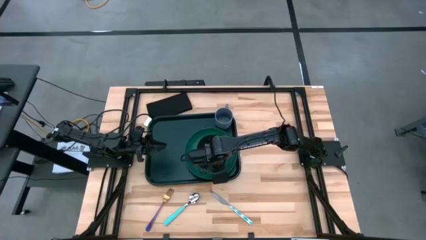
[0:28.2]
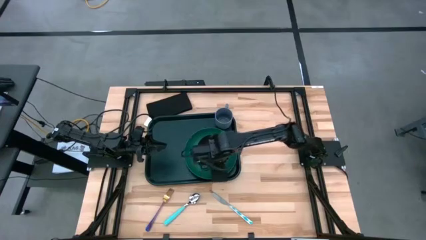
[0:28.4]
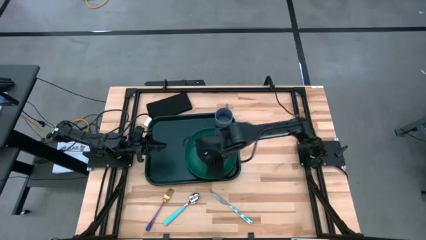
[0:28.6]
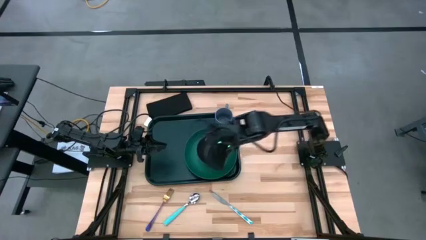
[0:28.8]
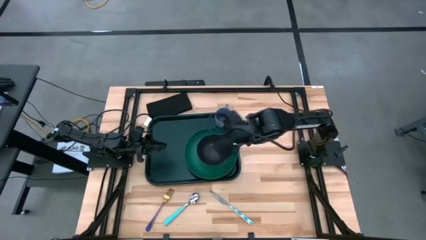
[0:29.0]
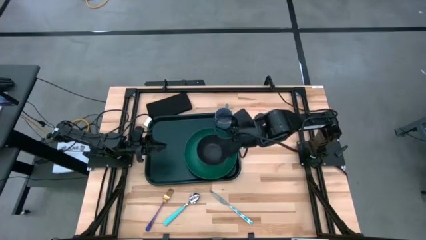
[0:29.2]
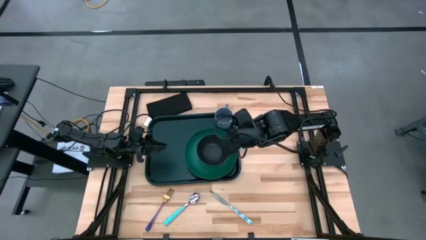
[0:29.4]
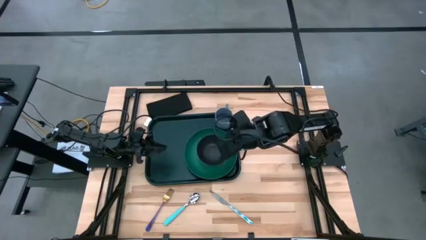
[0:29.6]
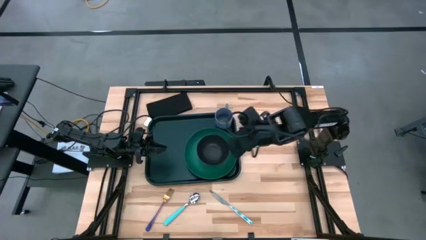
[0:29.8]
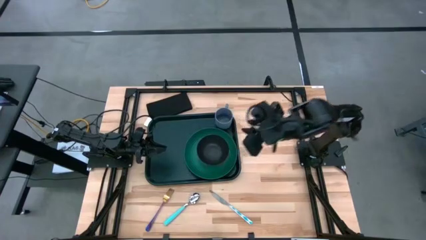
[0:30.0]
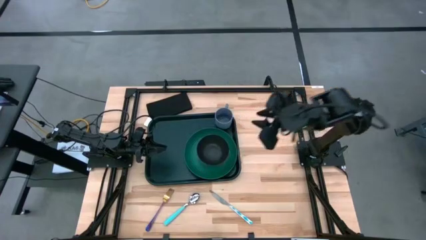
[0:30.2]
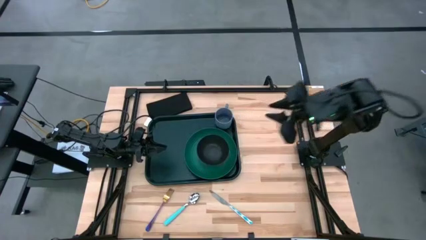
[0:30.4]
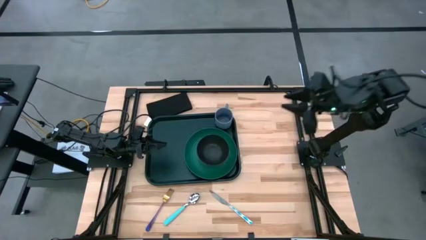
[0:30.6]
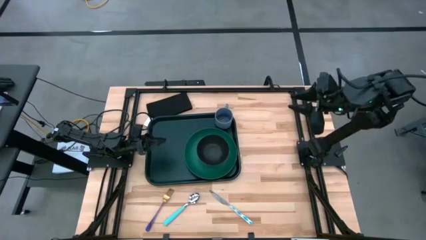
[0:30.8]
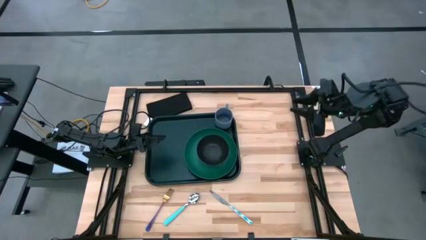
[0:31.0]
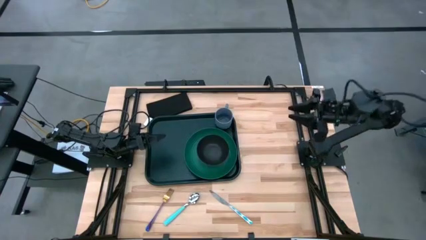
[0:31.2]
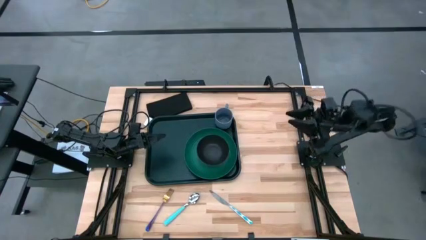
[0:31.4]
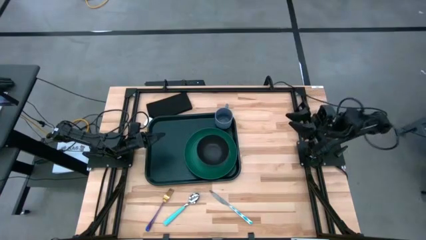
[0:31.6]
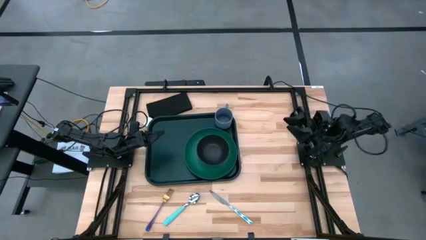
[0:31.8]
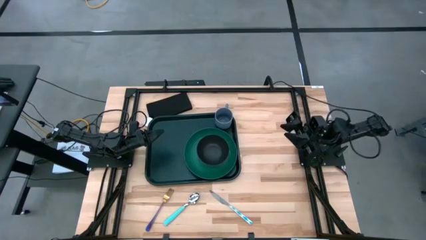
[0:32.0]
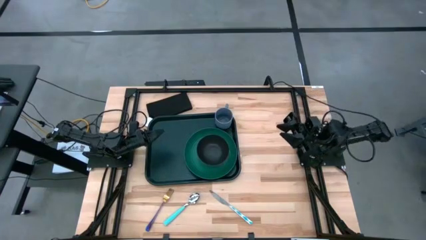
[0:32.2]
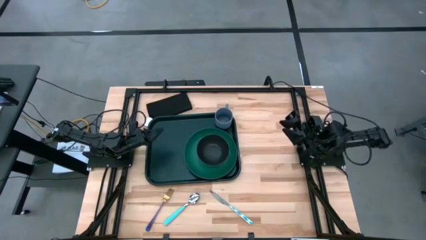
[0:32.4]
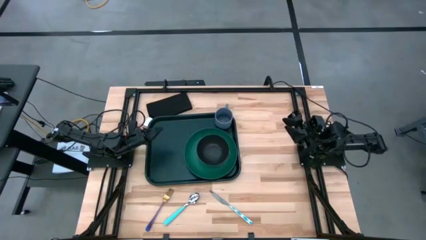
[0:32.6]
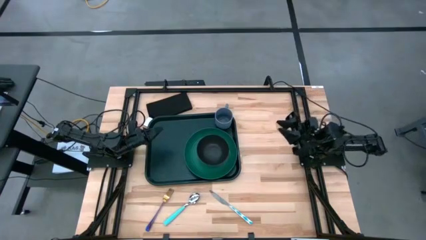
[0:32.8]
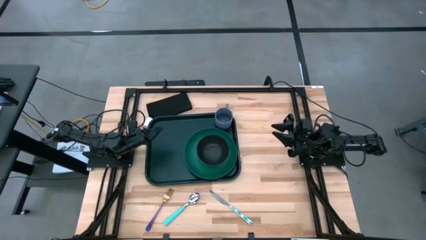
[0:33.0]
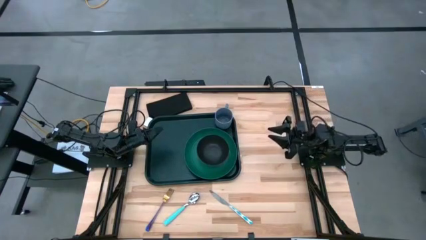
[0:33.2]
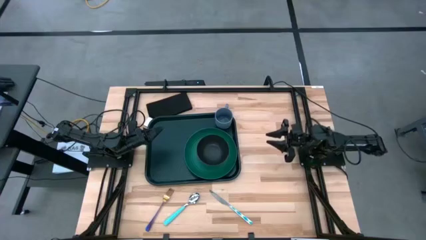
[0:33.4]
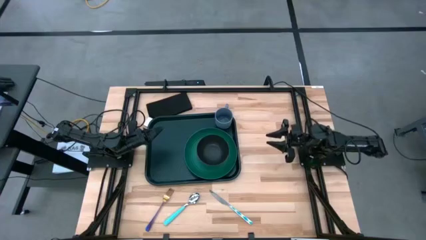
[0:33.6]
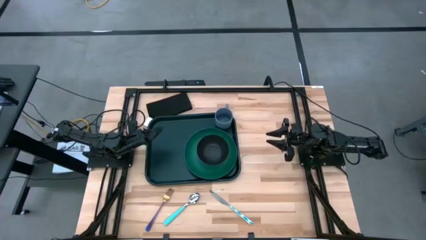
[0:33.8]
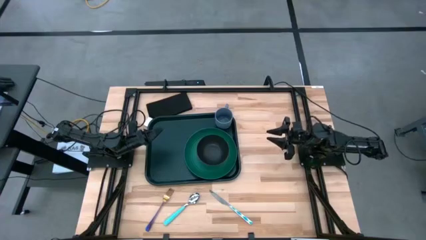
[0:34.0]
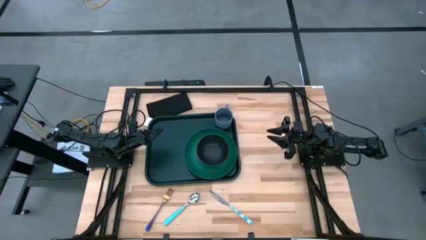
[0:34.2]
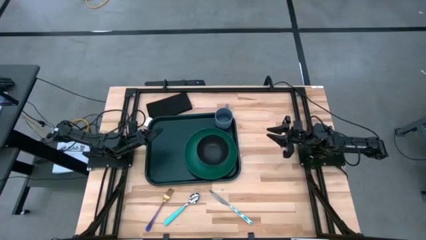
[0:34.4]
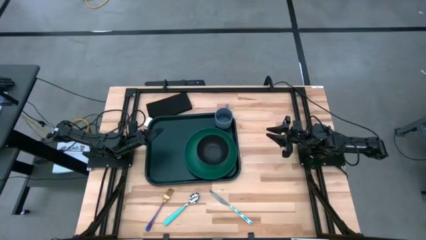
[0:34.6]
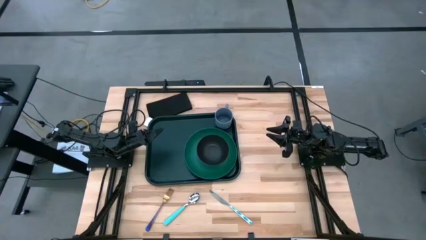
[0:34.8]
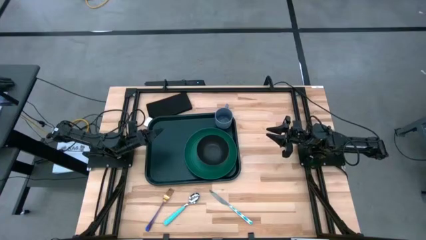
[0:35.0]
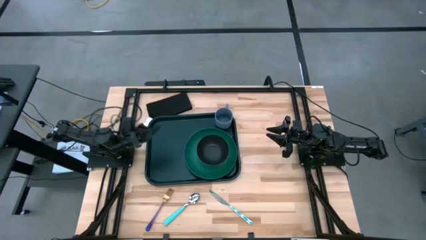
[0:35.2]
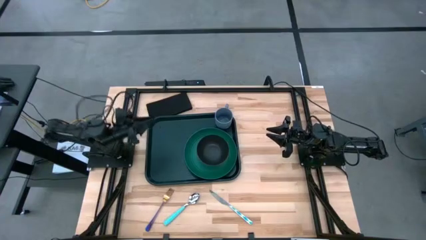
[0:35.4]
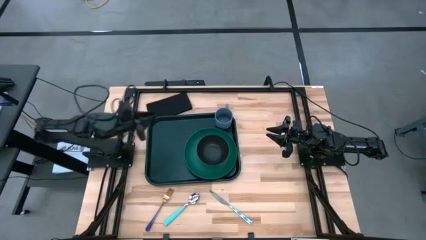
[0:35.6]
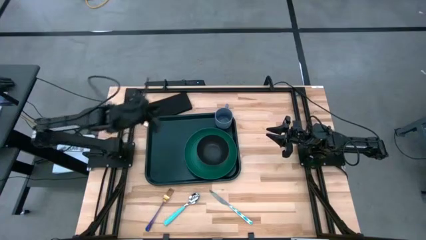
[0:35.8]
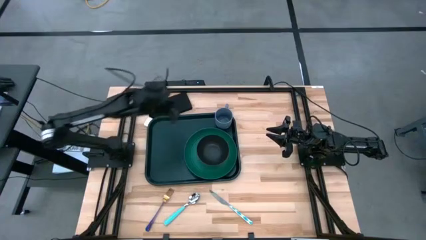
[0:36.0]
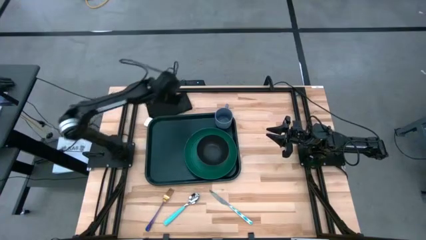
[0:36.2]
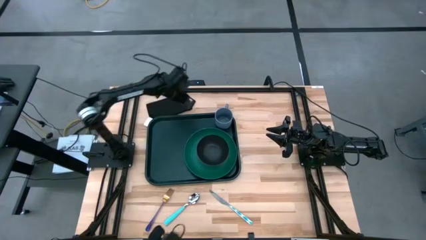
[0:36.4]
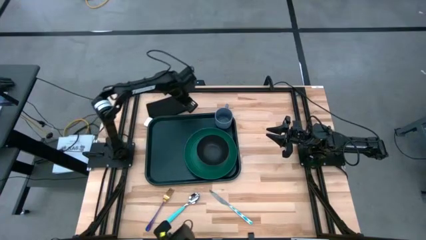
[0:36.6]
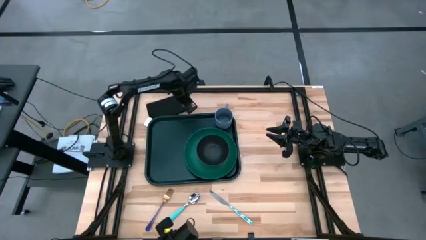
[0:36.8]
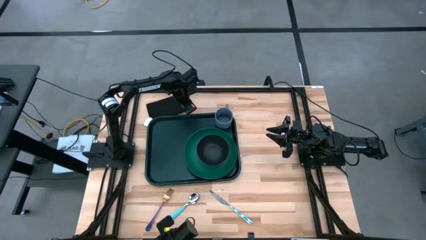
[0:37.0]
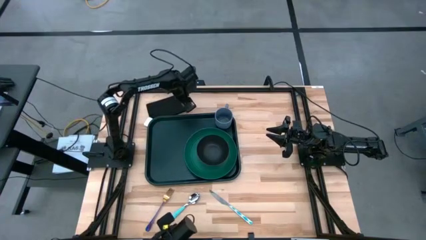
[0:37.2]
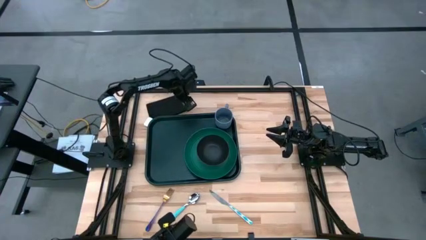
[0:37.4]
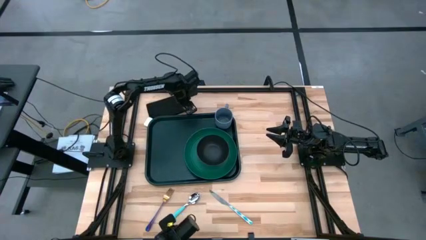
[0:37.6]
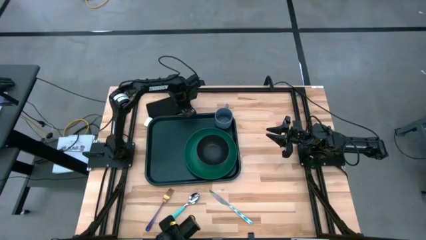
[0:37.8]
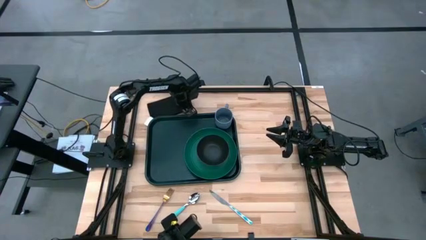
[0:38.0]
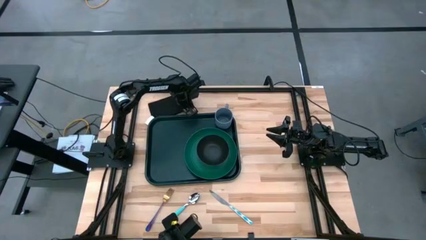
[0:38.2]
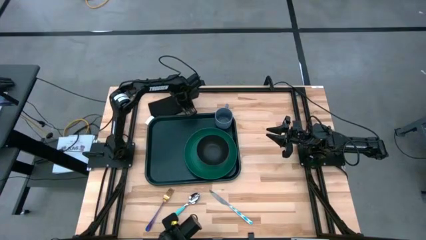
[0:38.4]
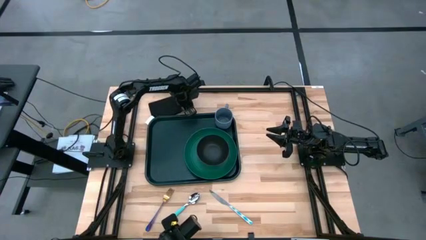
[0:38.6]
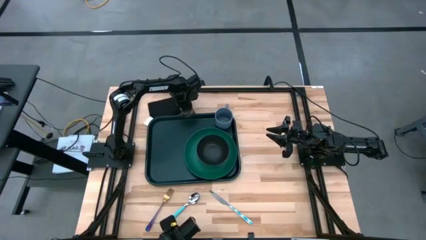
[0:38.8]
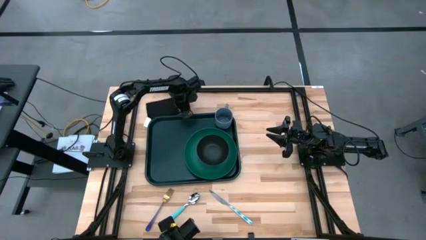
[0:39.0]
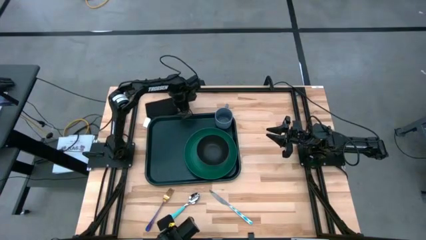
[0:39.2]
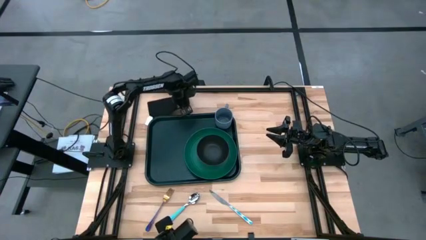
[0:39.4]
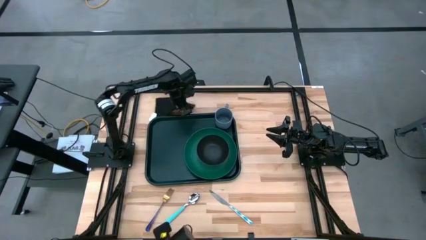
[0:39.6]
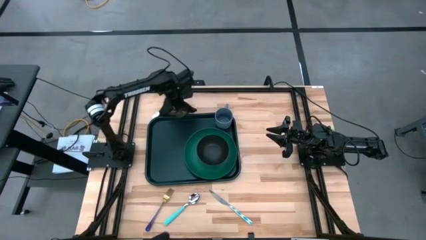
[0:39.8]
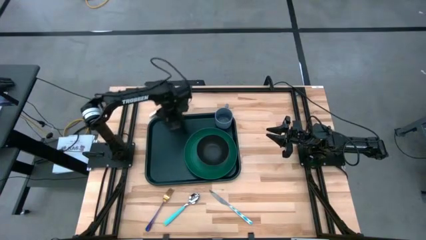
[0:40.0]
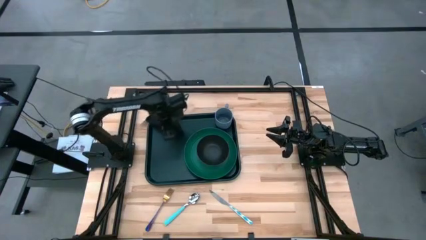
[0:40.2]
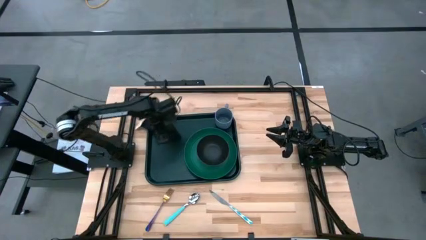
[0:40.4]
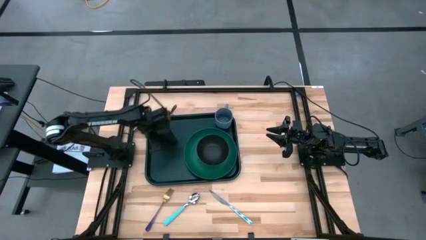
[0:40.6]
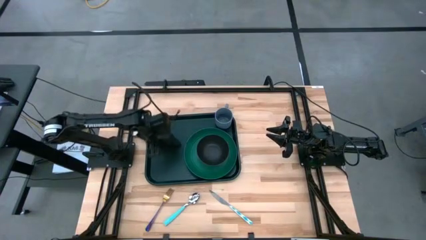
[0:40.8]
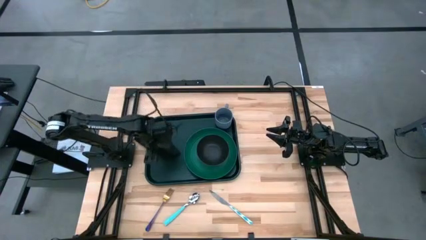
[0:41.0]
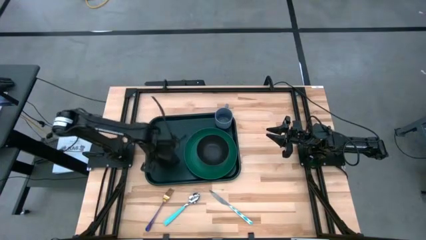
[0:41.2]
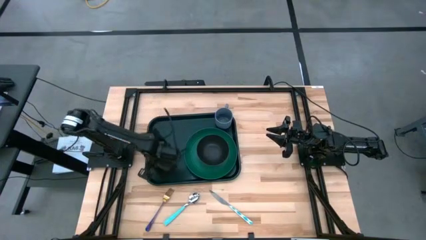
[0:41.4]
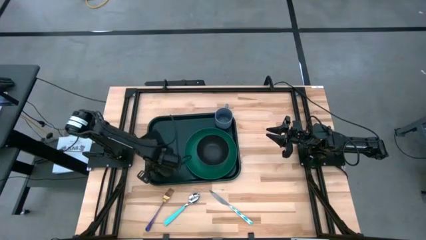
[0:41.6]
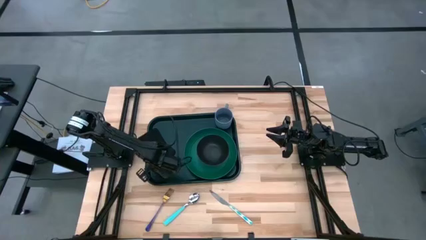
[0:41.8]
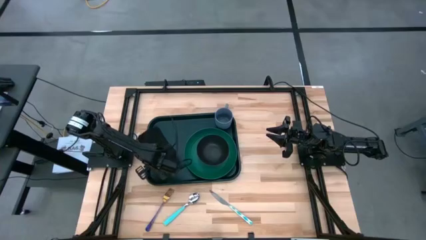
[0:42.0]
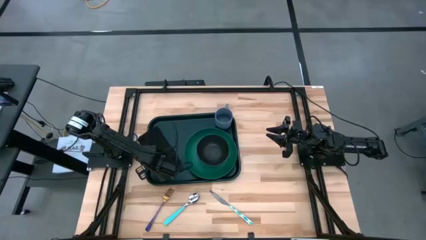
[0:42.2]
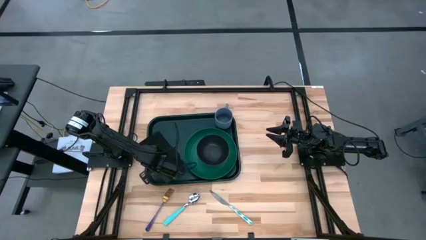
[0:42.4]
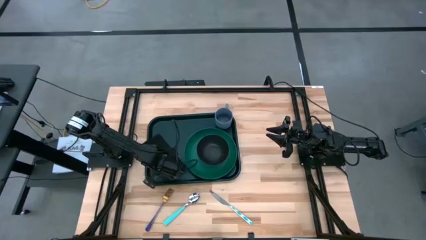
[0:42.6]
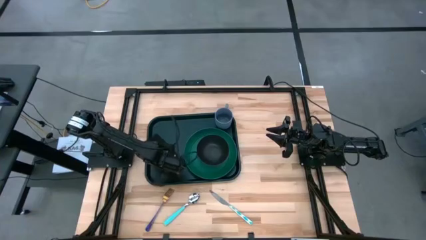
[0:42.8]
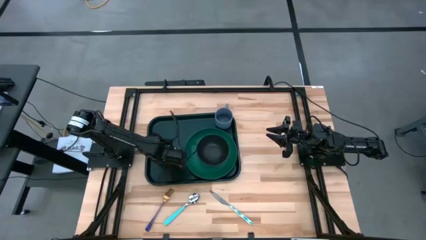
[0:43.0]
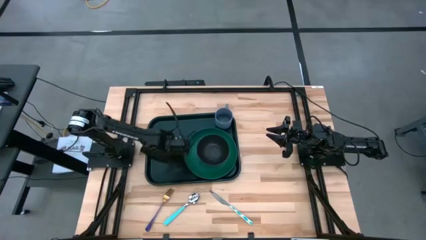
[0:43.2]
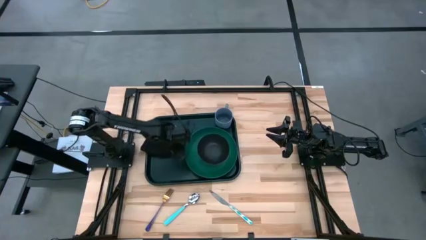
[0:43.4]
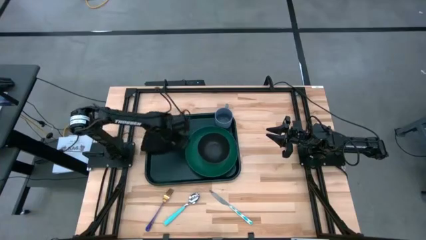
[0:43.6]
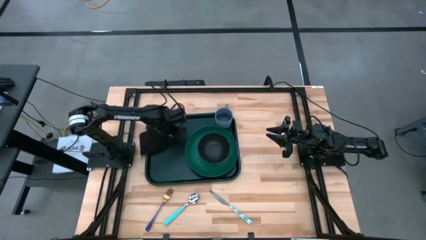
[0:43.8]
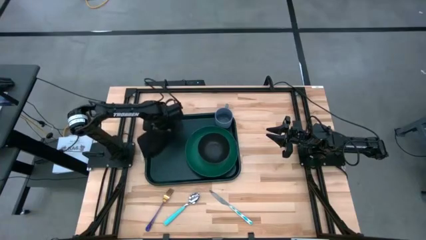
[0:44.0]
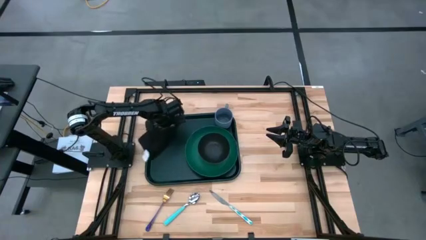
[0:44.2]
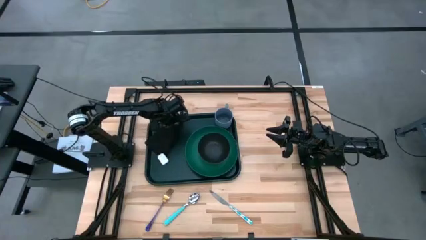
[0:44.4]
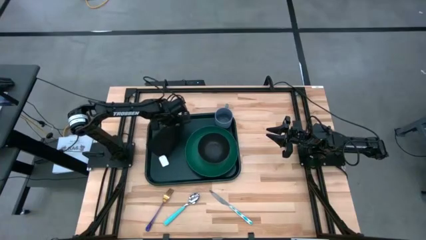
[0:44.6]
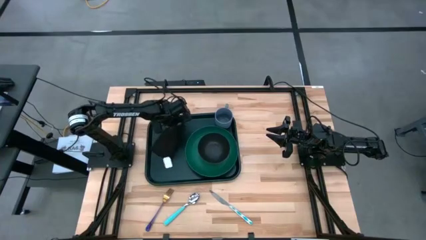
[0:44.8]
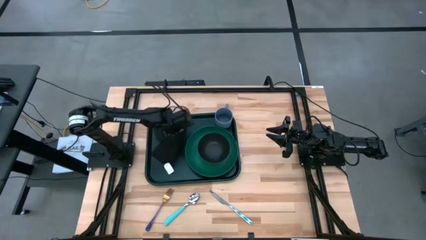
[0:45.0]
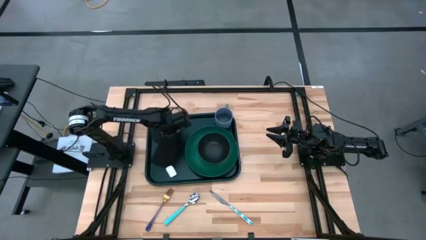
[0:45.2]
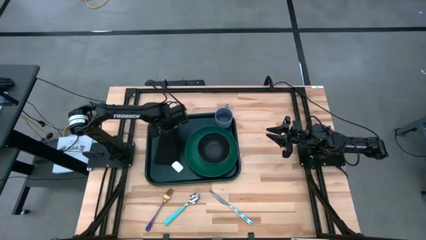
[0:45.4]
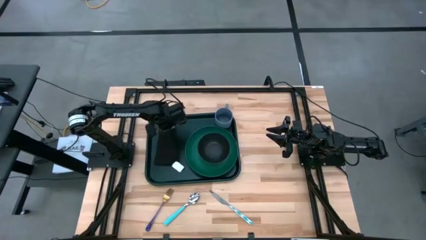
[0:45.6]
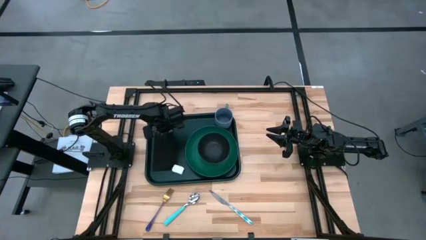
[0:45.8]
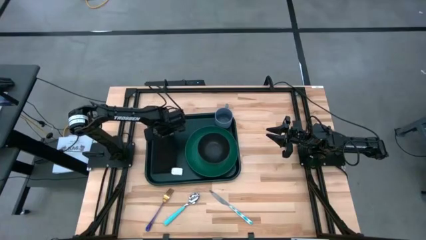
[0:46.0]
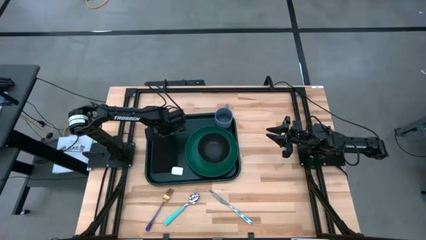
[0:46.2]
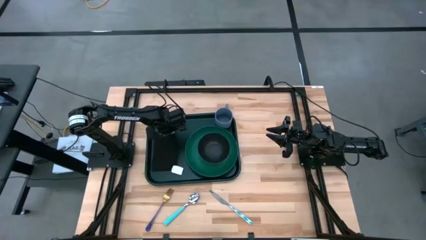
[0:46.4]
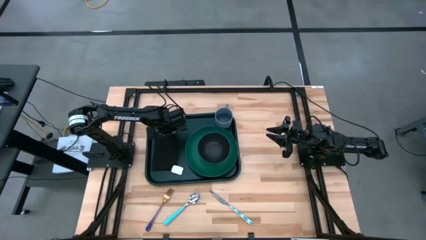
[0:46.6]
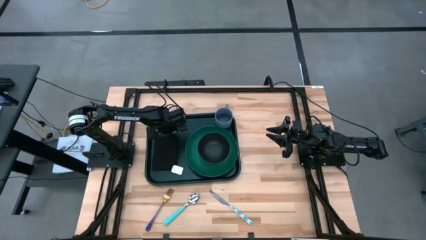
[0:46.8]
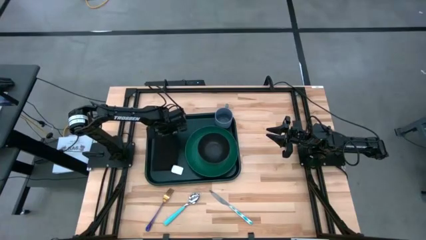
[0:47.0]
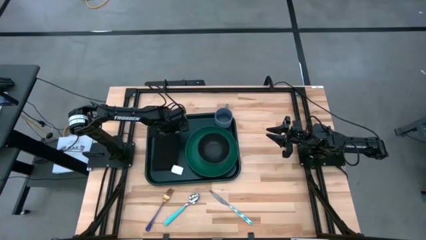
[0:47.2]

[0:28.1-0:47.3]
Task: Set up tray
Put the napkin on the black tray to the left of the green plate
